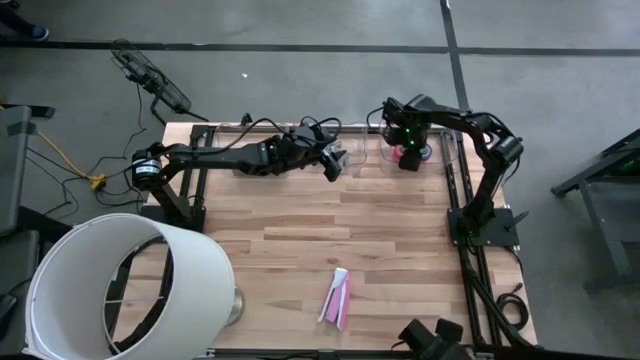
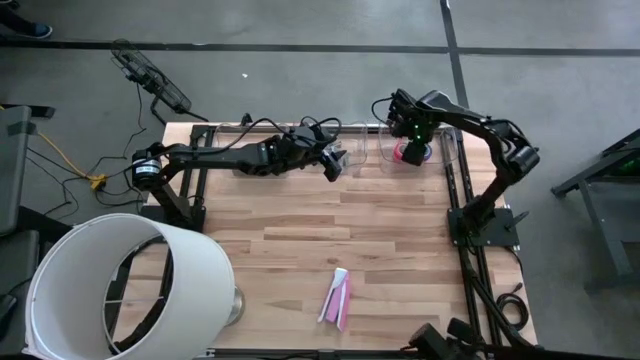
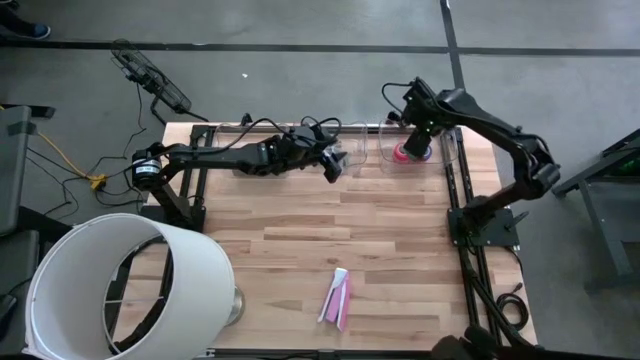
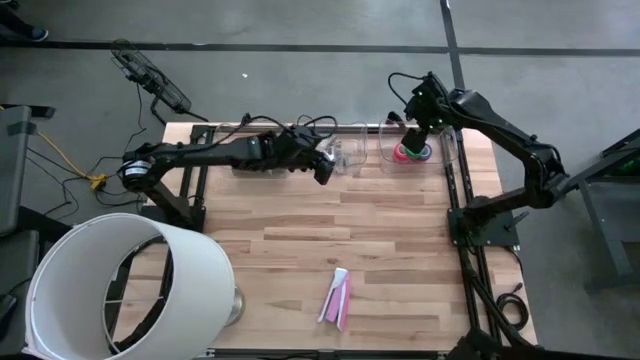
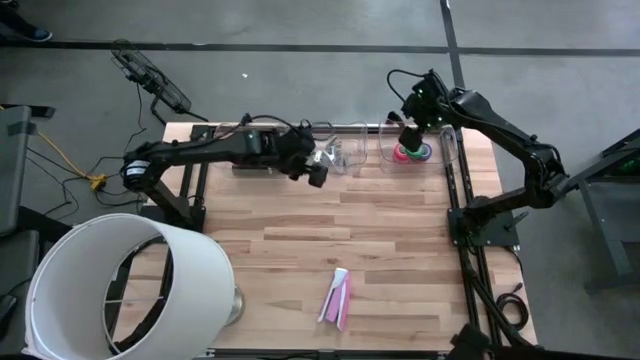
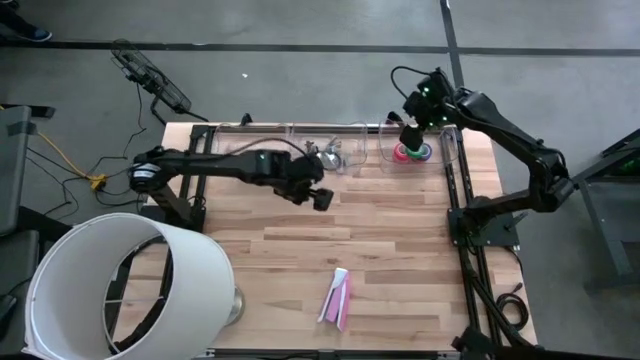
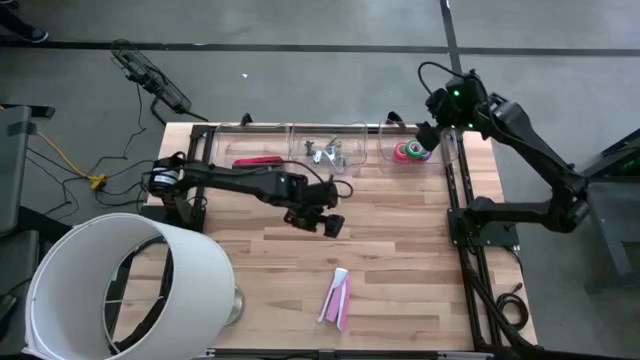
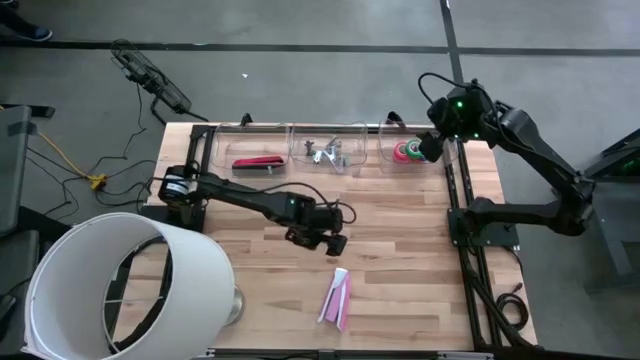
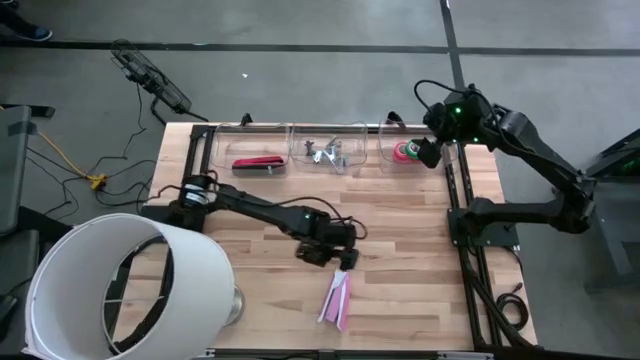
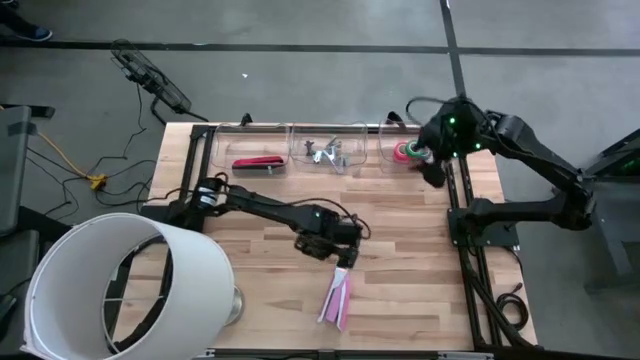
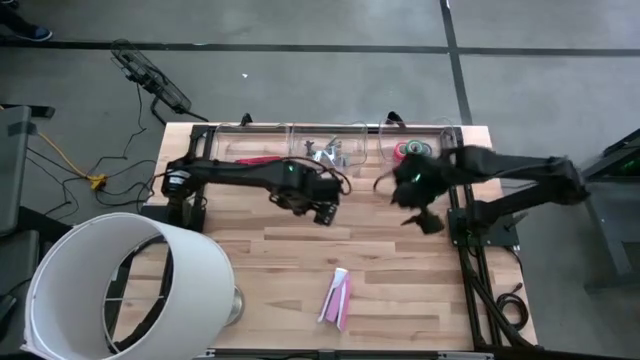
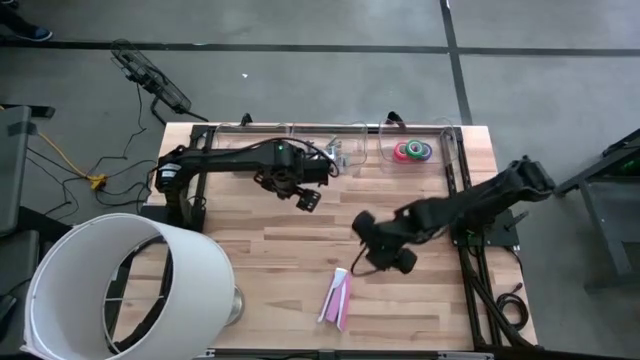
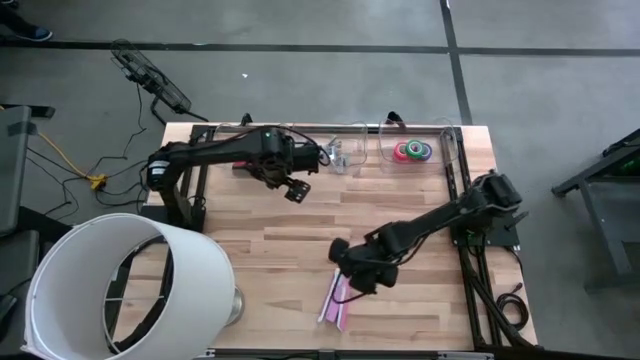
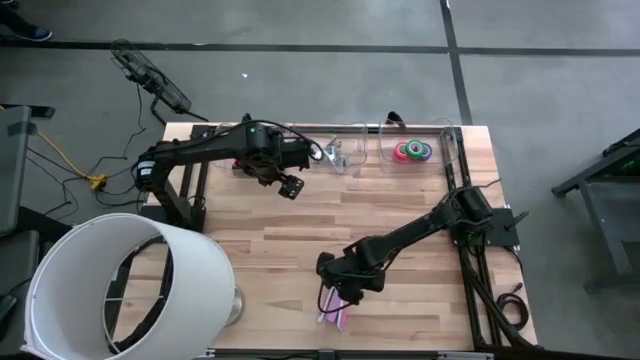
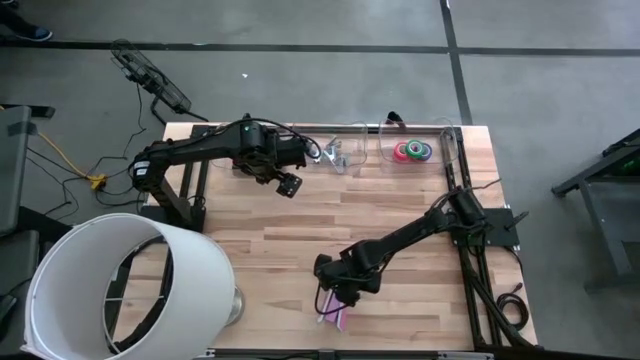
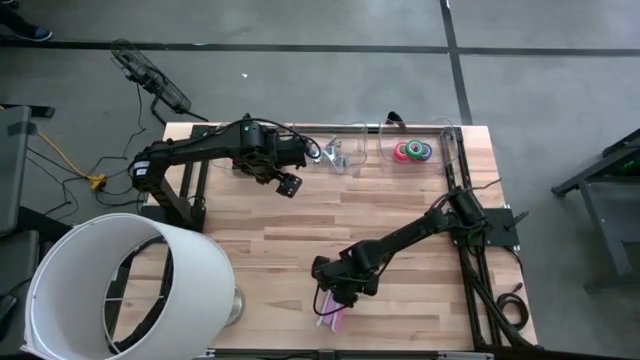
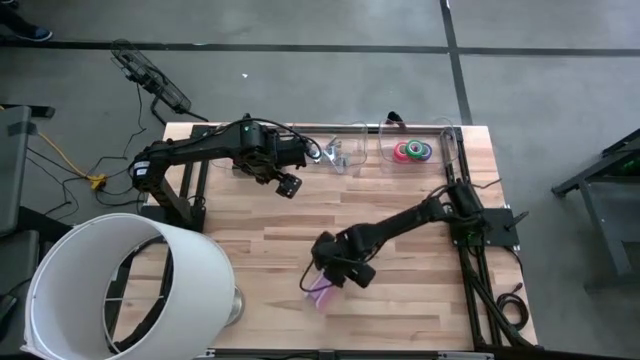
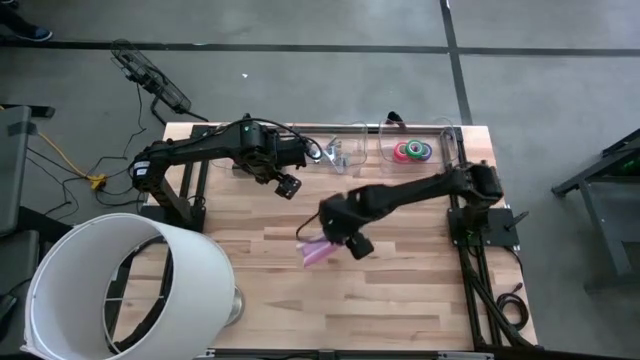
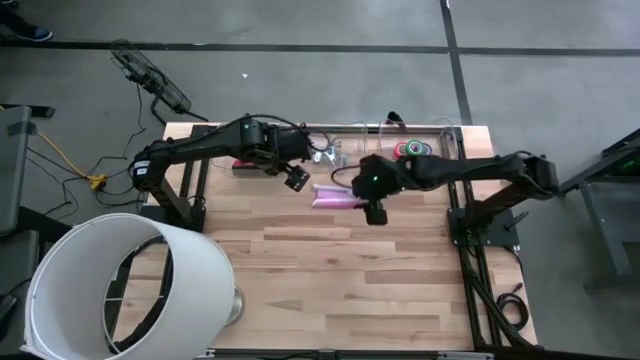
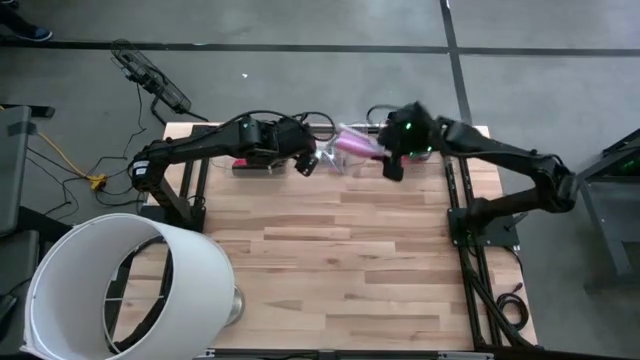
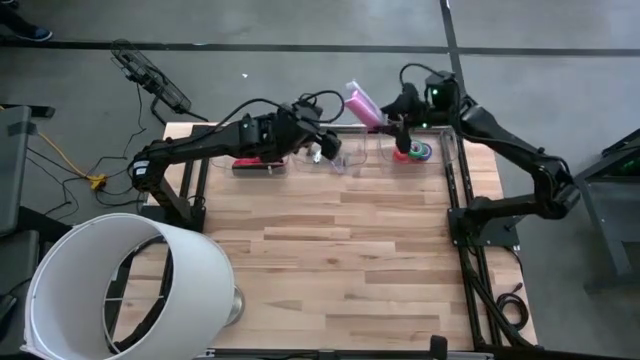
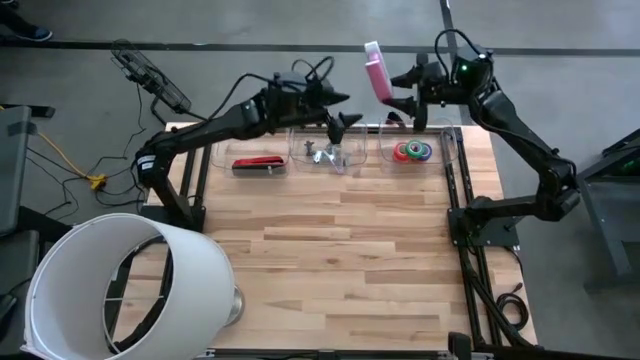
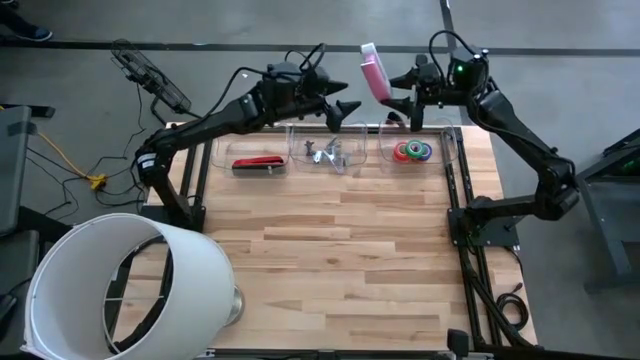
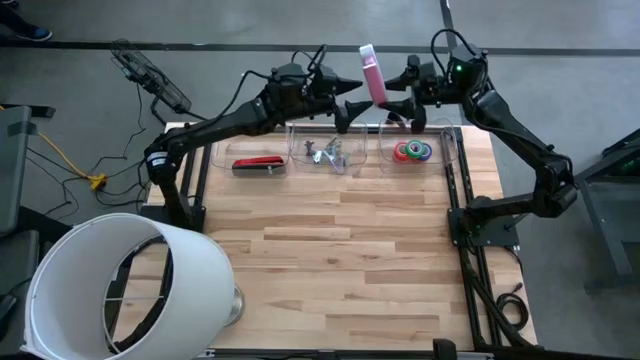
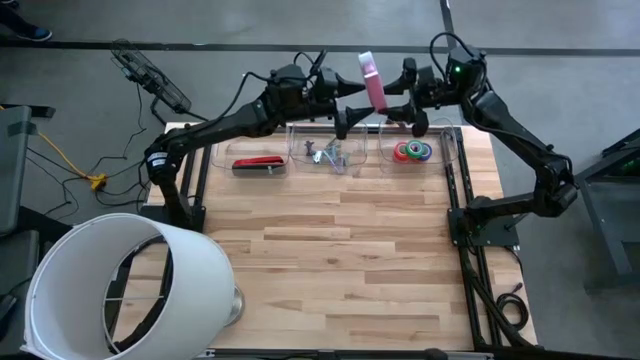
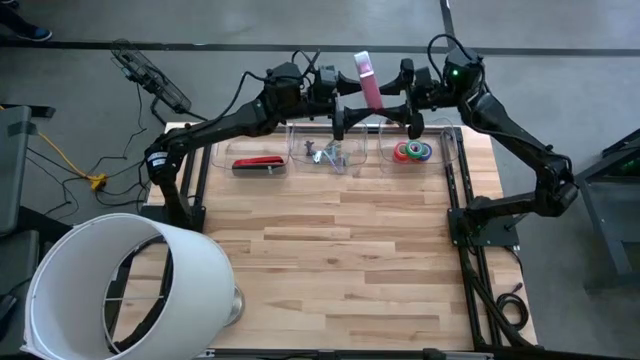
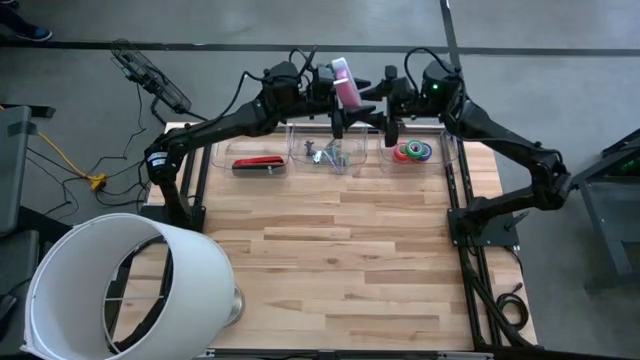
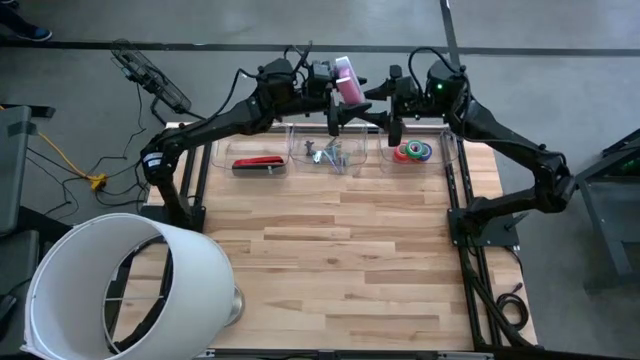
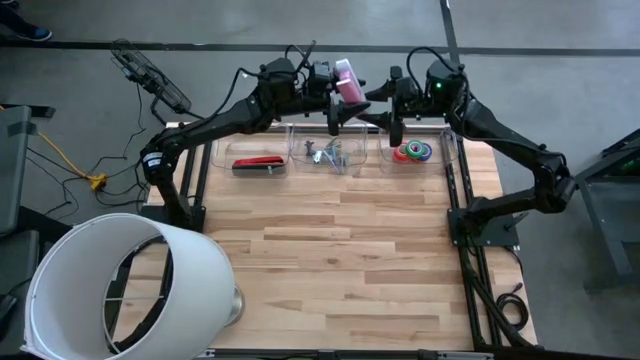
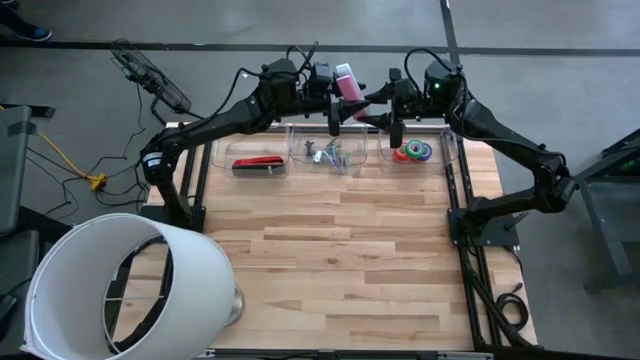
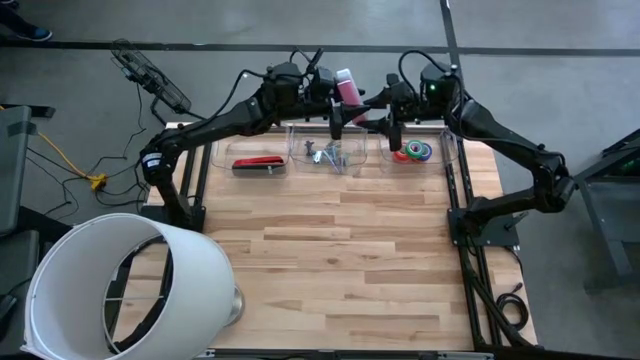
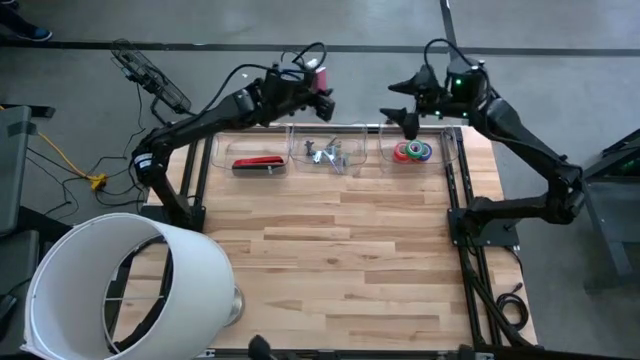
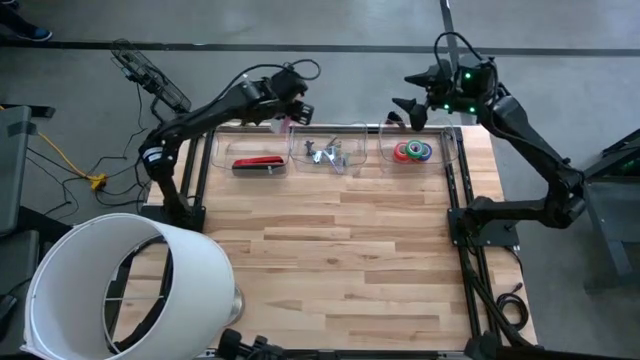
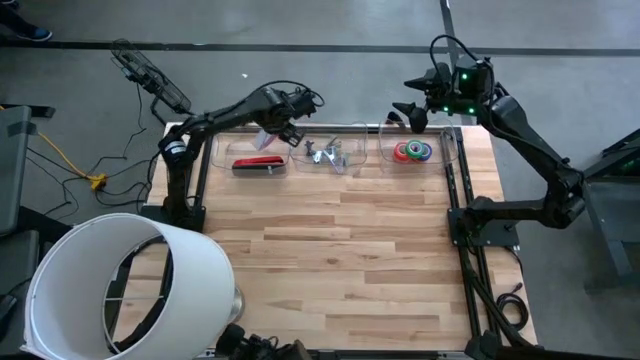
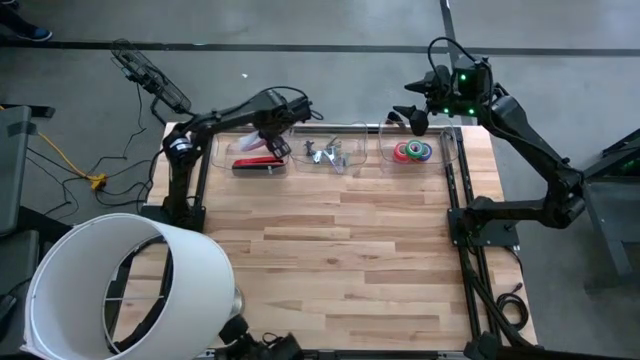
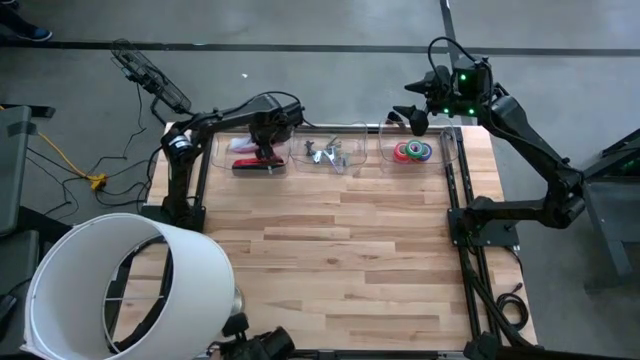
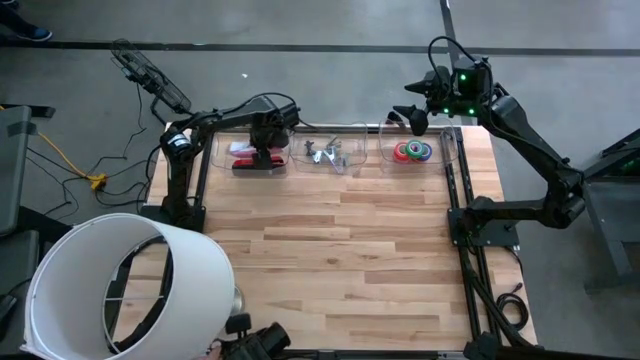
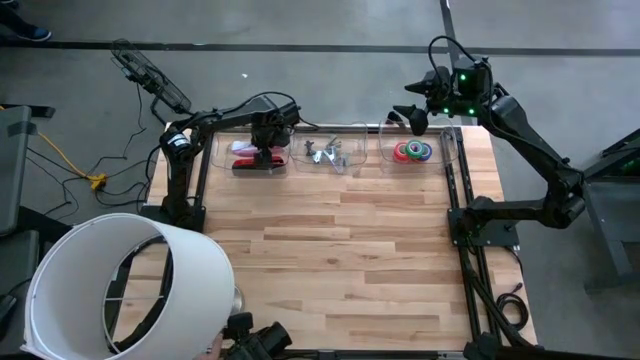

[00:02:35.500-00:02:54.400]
Task: Pick and place Stapler, Stapler remover, tape
Put the pink stapler into the left transparent bin
